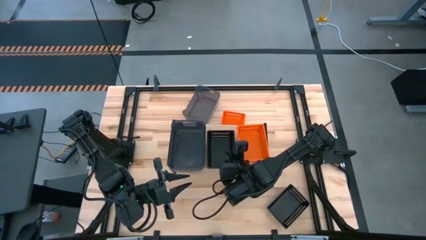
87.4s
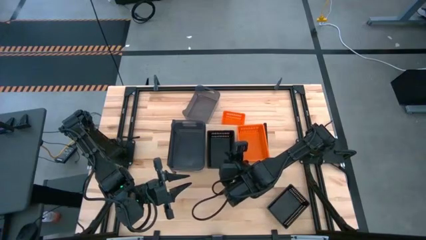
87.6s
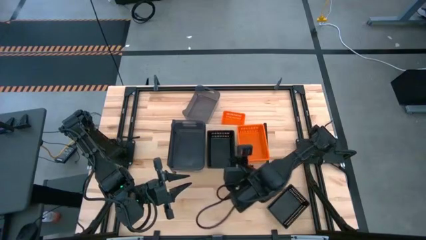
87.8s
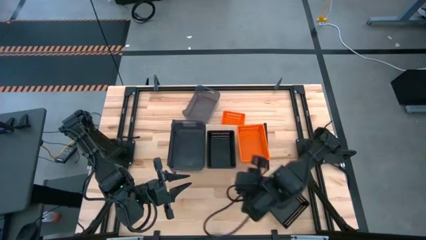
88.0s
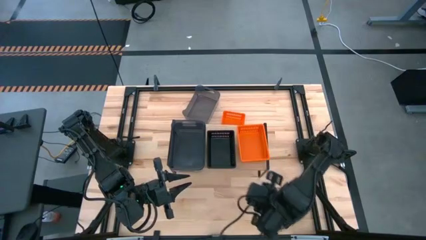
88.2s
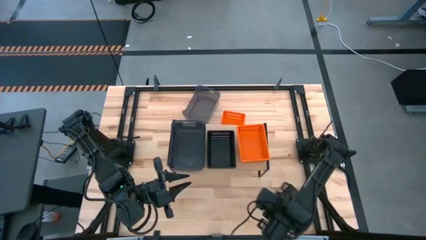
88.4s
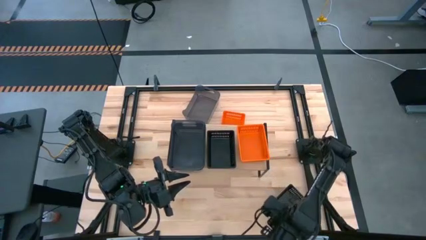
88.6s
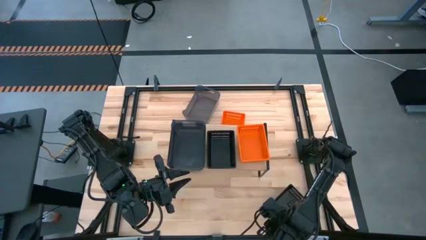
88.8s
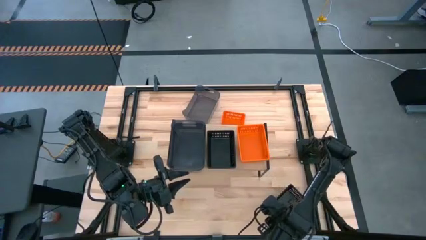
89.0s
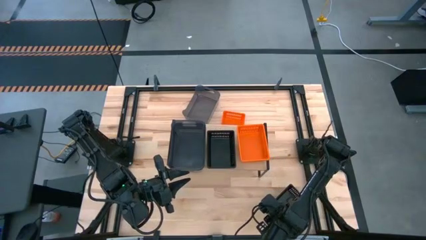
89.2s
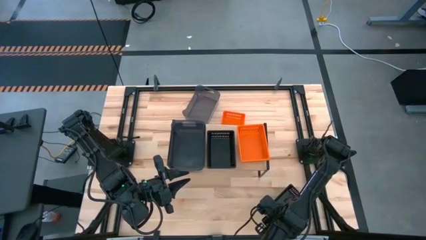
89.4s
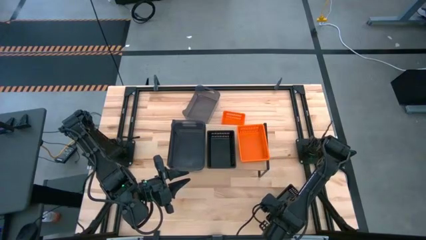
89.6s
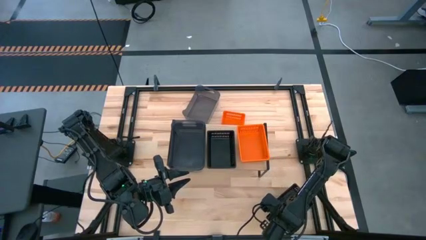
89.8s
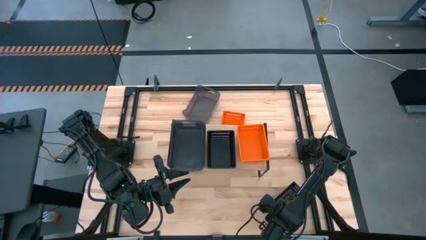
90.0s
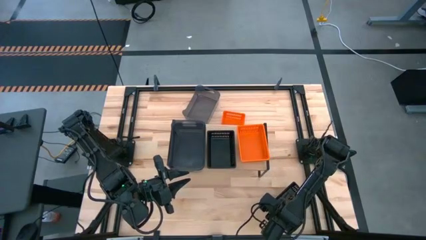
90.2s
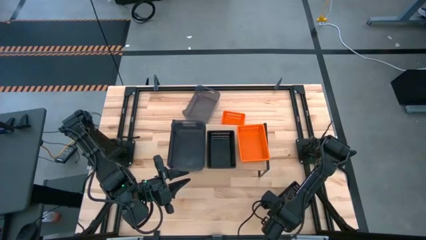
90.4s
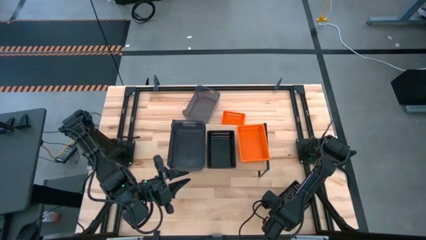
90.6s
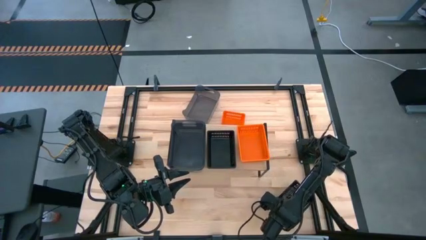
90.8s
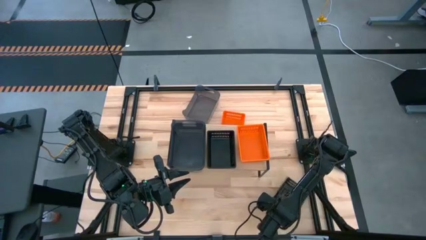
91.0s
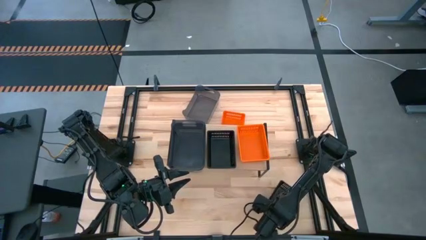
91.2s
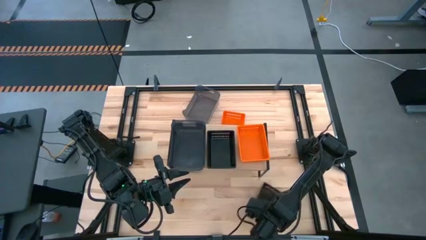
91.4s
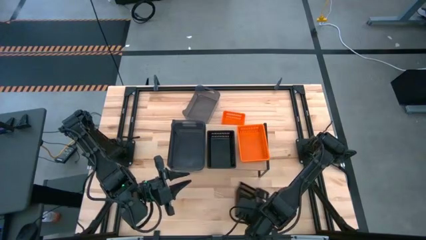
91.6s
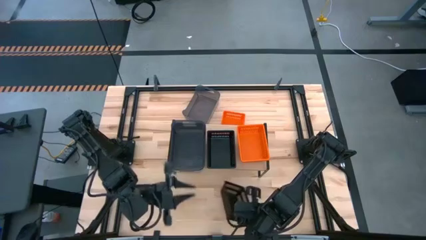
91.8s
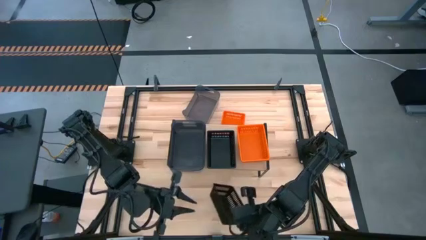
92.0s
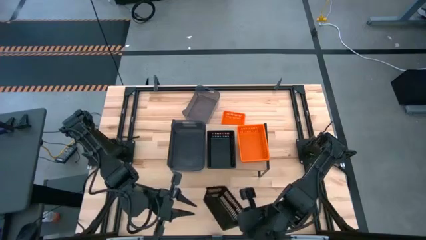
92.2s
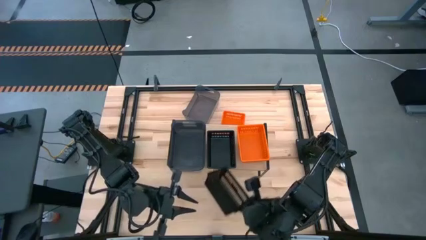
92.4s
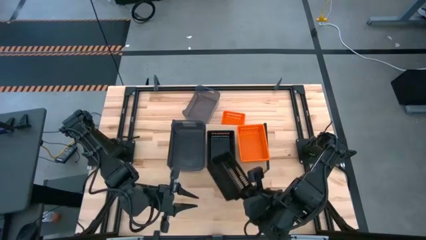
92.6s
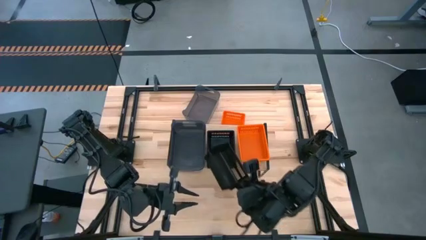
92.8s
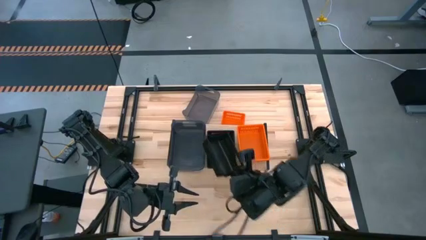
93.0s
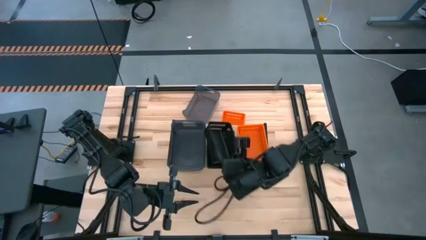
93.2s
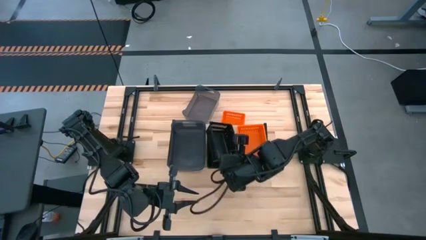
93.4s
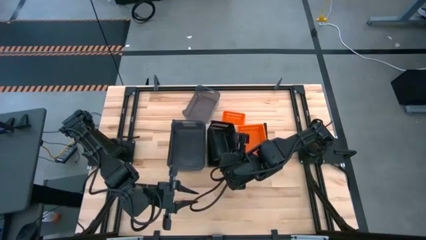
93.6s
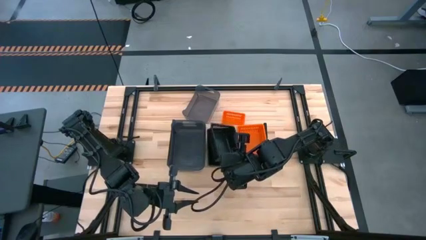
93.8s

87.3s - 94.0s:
Task: Stack baskets on shelf by color
Stack the black bin on top of the black bins on the shelf

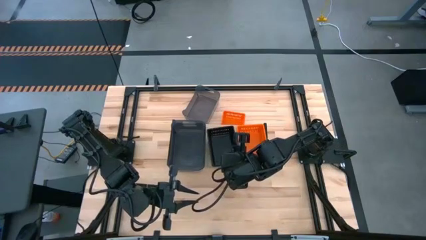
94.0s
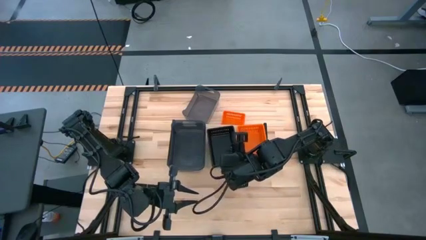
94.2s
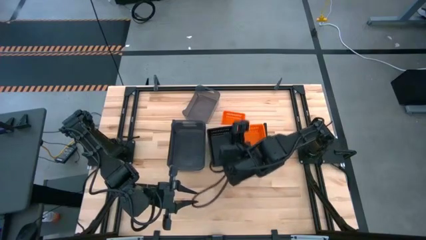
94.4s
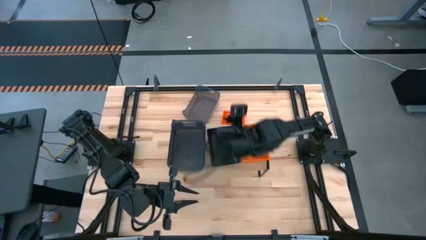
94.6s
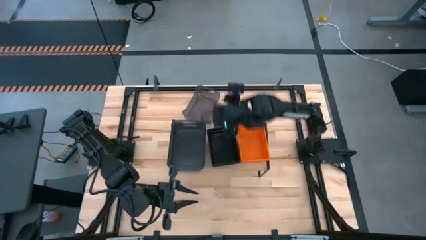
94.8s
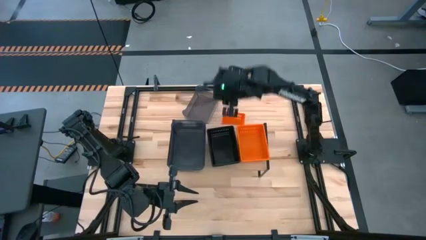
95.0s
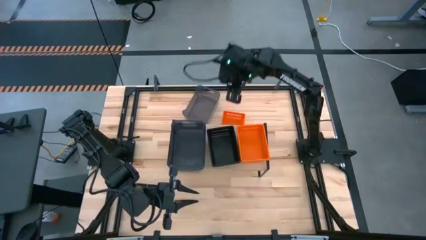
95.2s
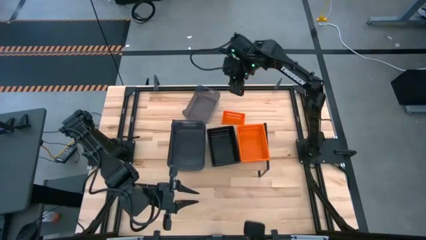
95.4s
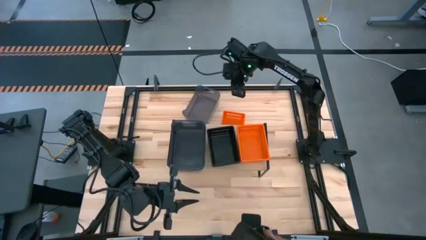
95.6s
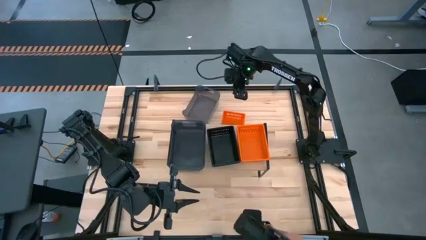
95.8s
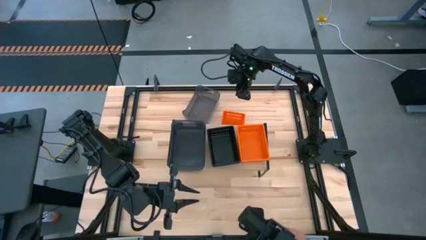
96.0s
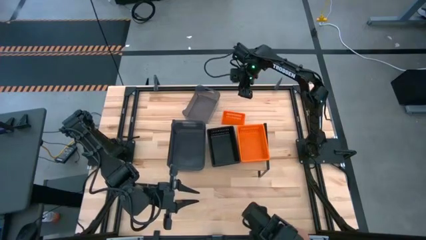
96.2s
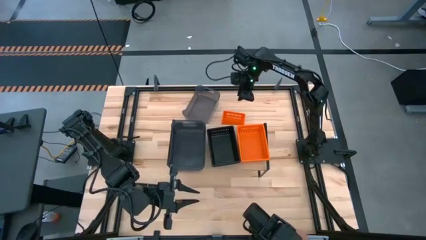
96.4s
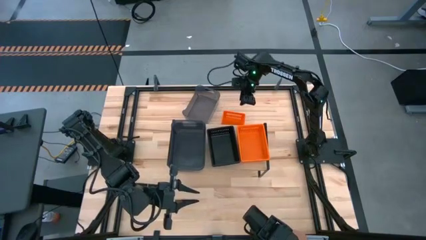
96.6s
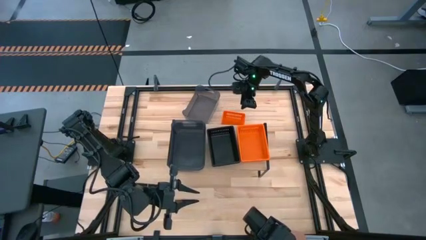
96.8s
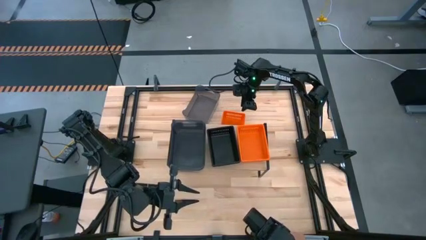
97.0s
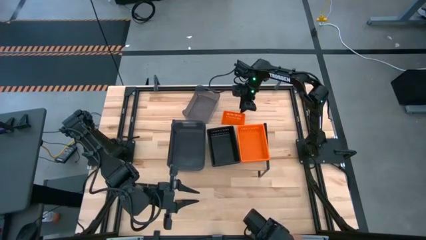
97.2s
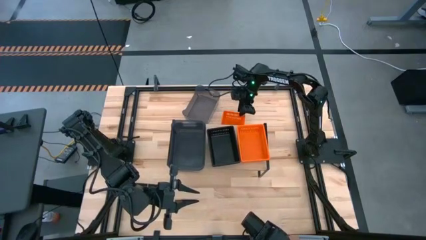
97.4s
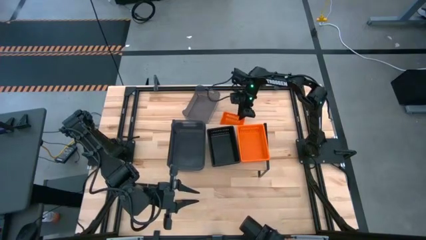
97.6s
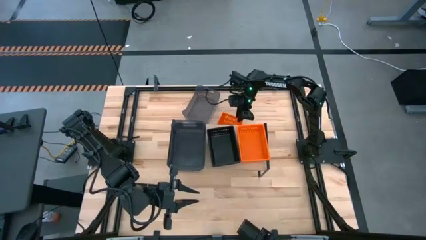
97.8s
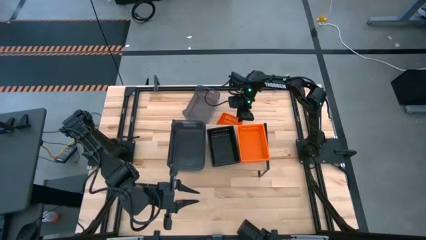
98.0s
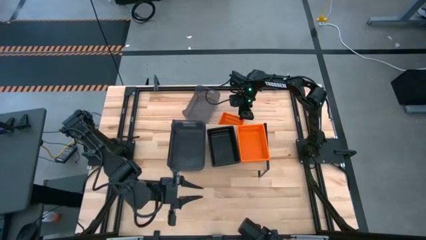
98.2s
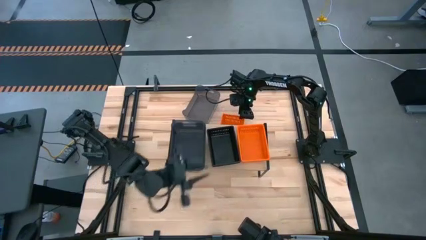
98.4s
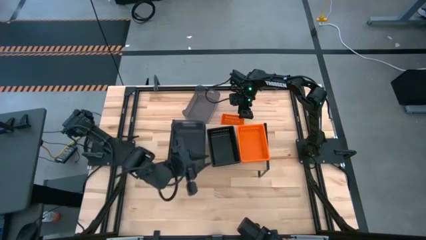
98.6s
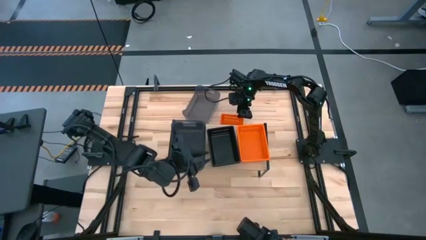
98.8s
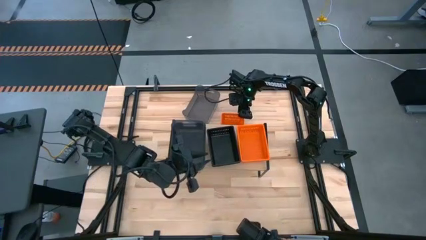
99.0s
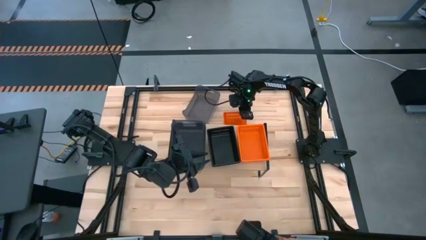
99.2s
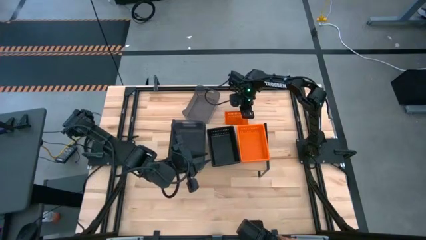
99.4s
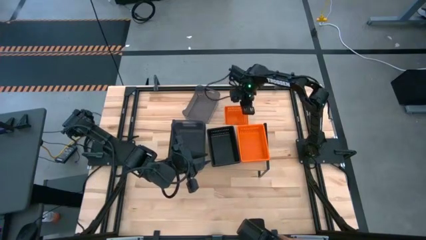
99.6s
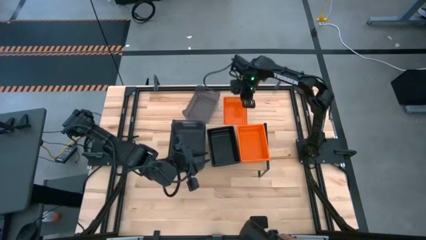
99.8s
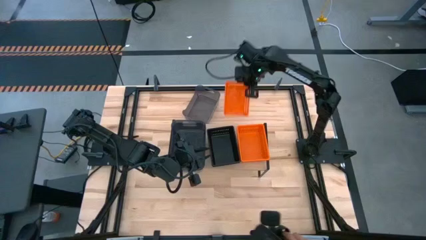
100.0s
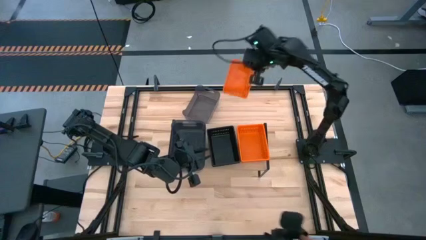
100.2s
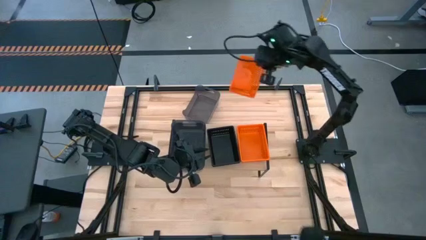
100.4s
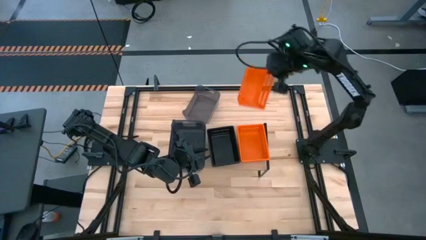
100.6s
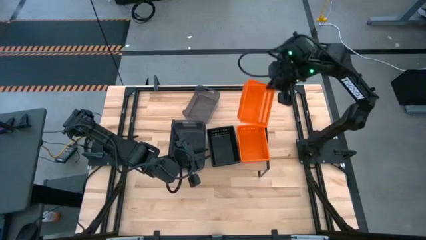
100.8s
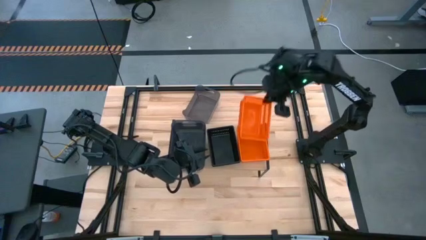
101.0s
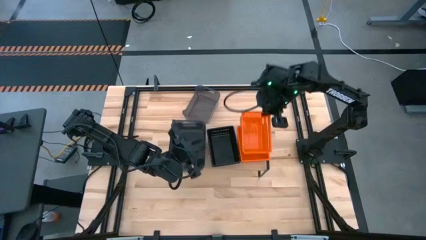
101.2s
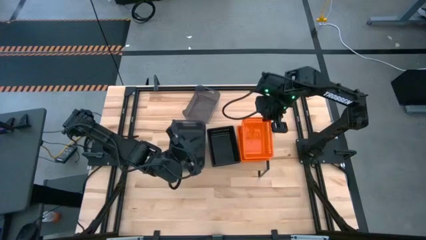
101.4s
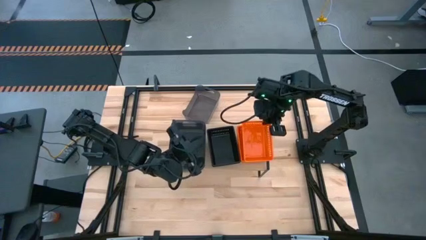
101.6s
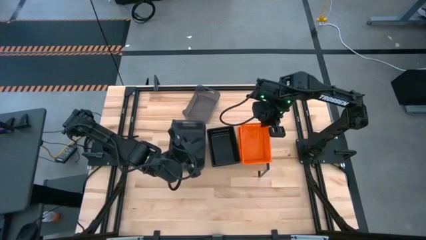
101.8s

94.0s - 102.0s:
Stack the orange bin on top of the orange bins on the shelf

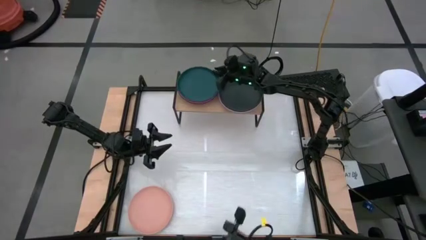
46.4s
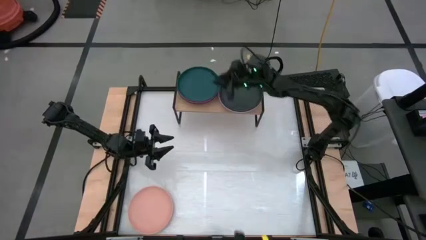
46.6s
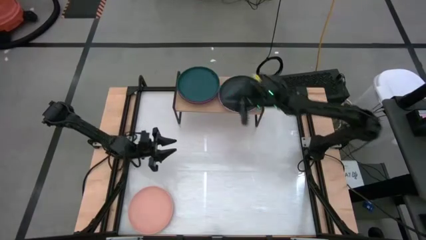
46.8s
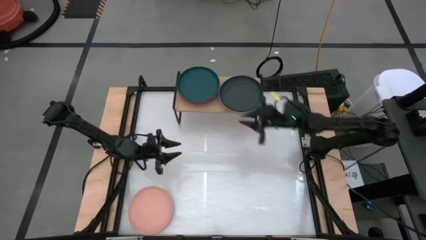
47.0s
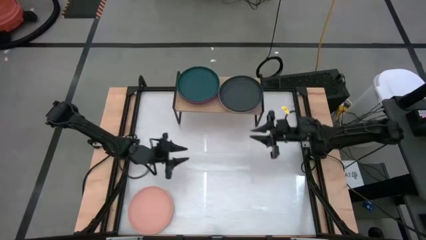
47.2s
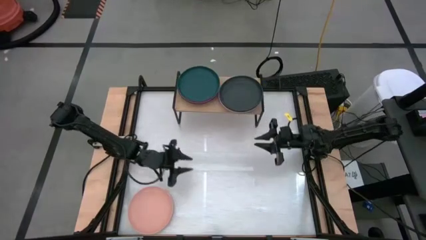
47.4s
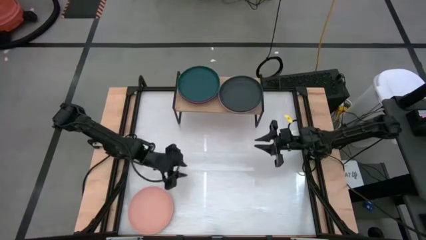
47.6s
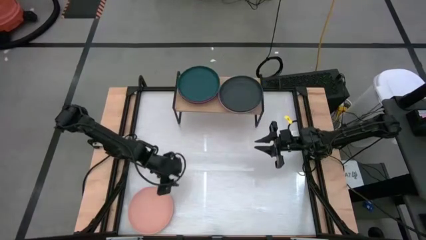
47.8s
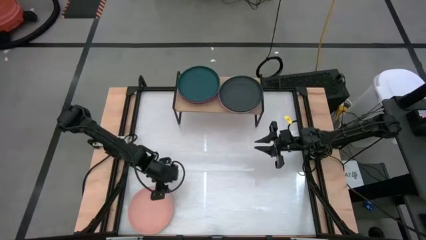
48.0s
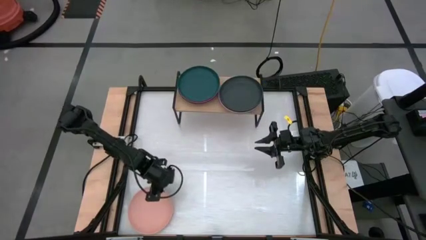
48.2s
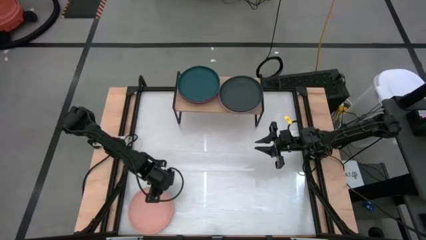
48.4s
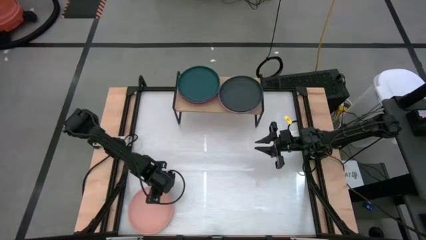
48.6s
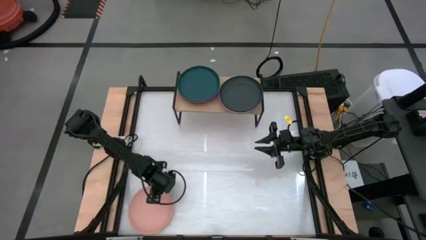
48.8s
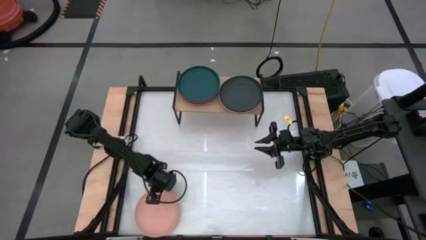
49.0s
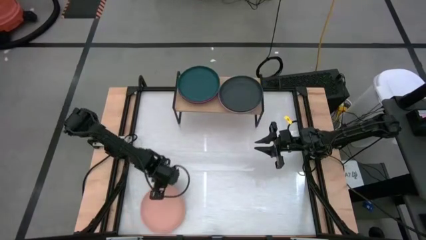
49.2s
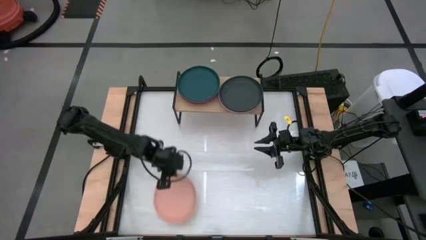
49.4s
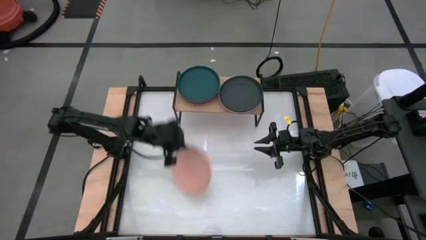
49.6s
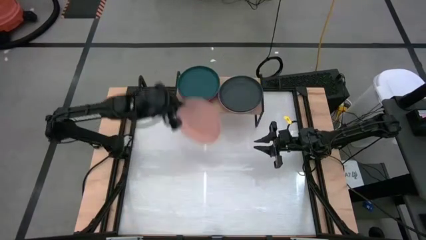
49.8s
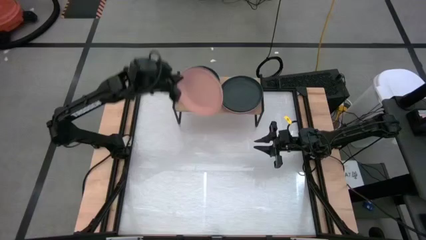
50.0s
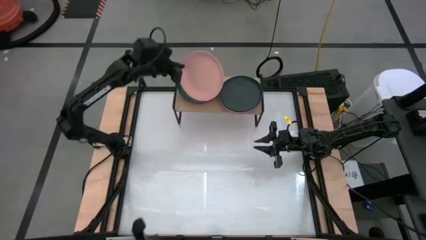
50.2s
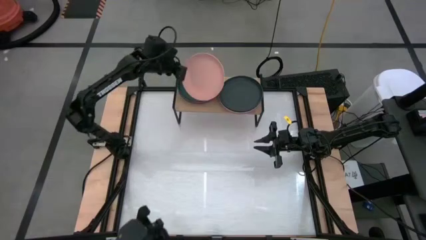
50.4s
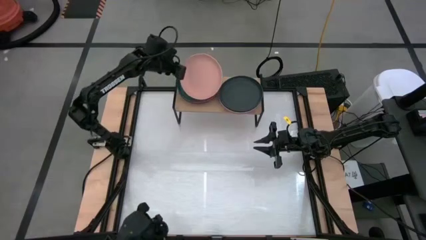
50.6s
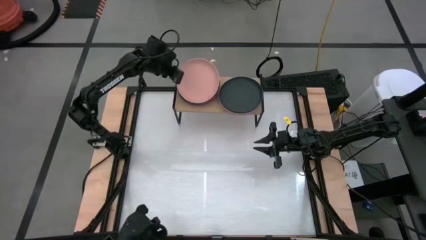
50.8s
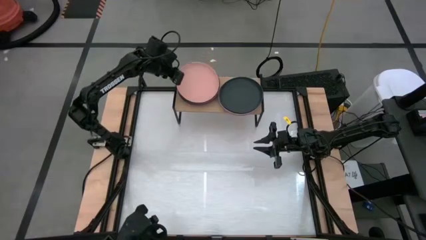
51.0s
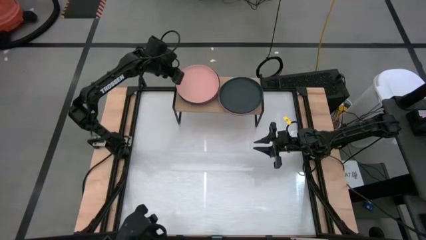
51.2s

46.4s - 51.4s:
Task: Place and stack plates onto a shelf
Stack the light orange plate on top of the dark green plate on the shelf
